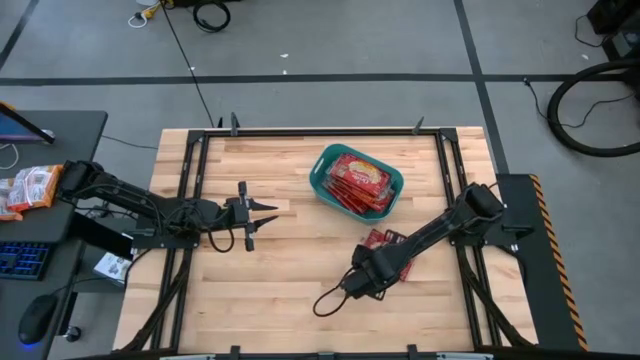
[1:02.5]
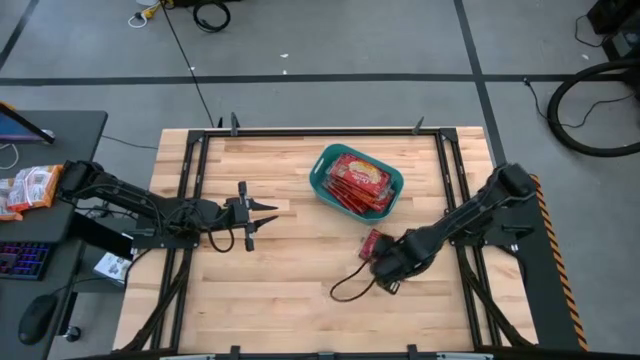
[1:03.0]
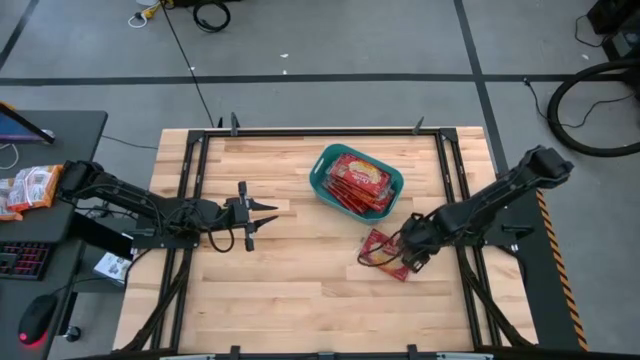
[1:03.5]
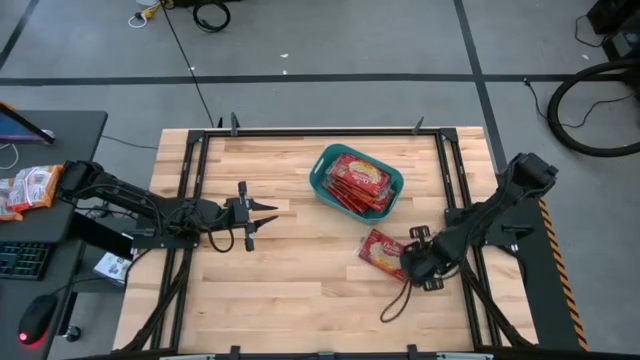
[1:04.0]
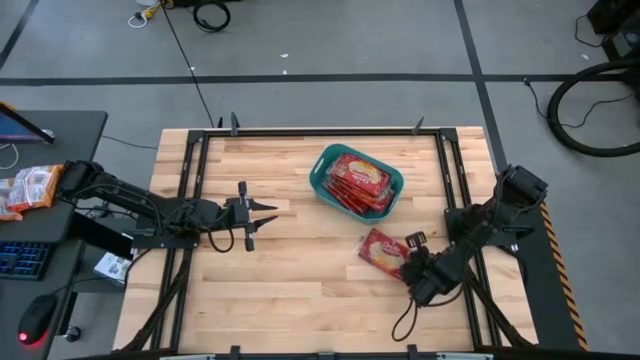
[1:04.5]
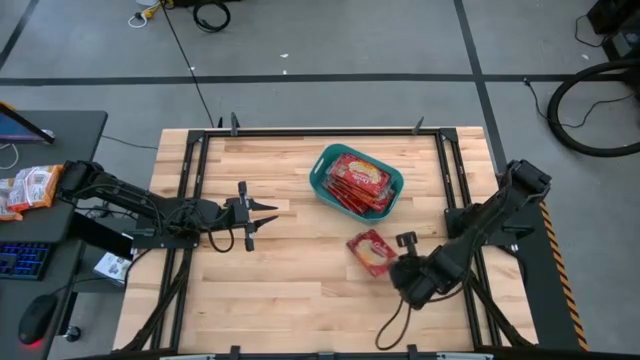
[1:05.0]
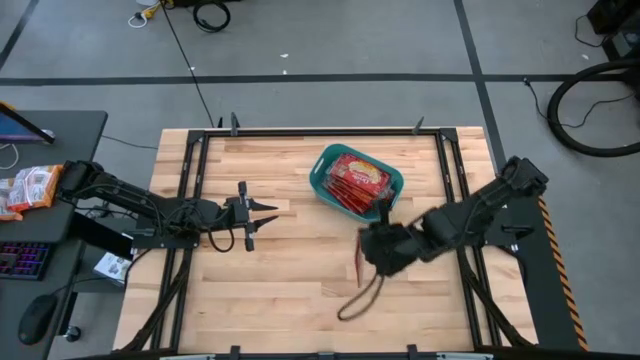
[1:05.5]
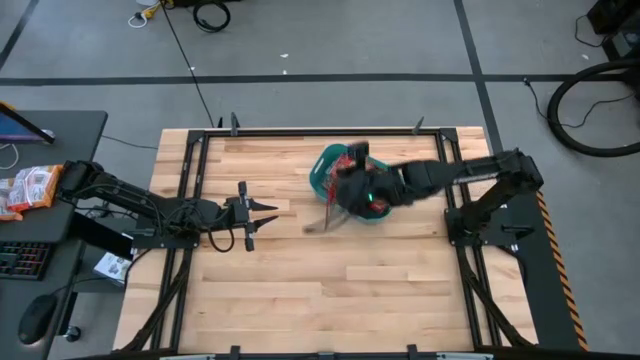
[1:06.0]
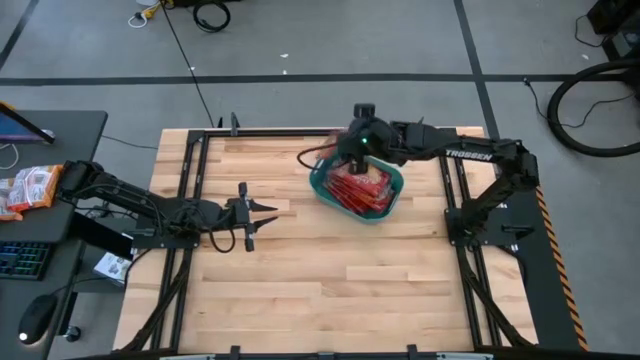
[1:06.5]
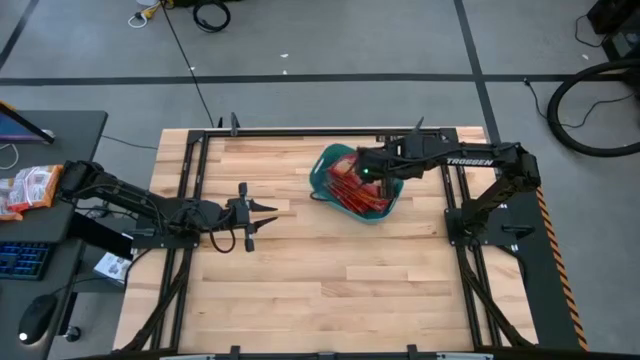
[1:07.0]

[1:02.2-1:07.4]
Task: Sort popcorn bags into baskets
Put the red popcorn bag into the green bin

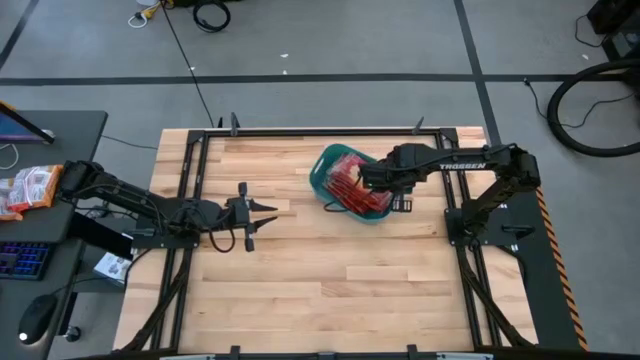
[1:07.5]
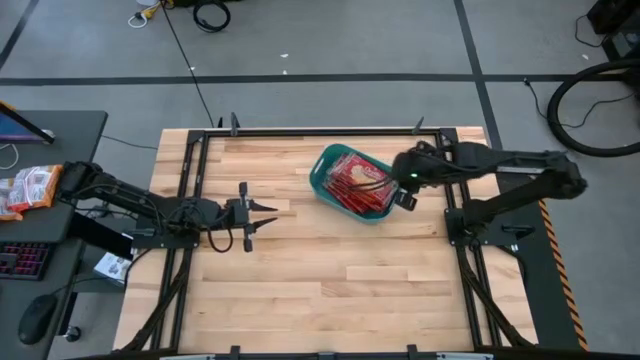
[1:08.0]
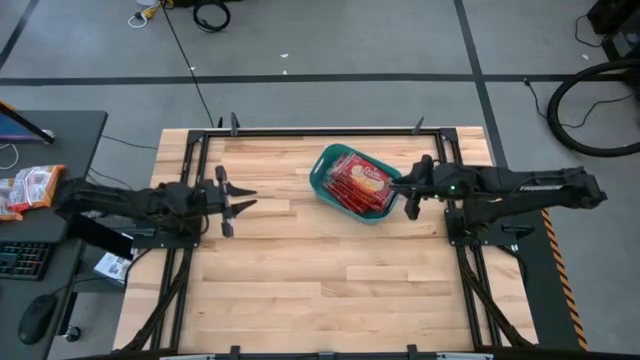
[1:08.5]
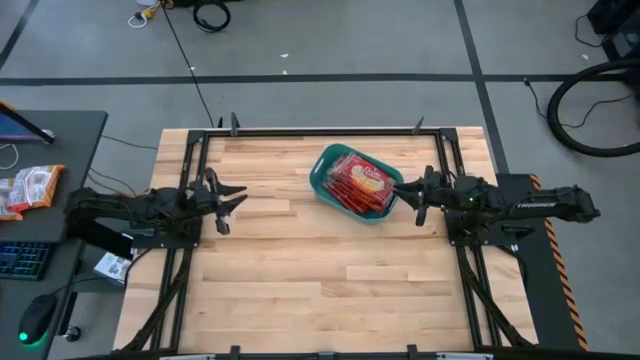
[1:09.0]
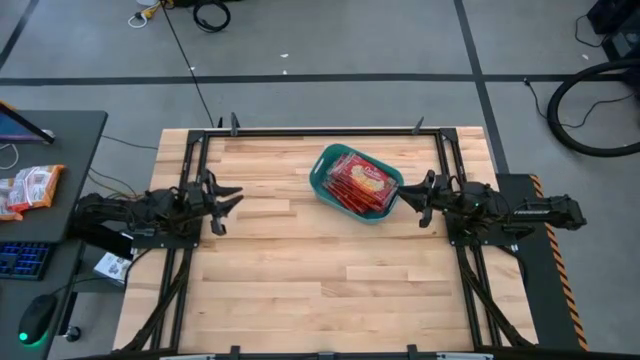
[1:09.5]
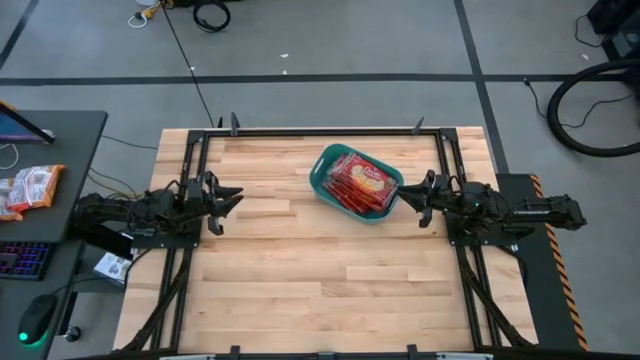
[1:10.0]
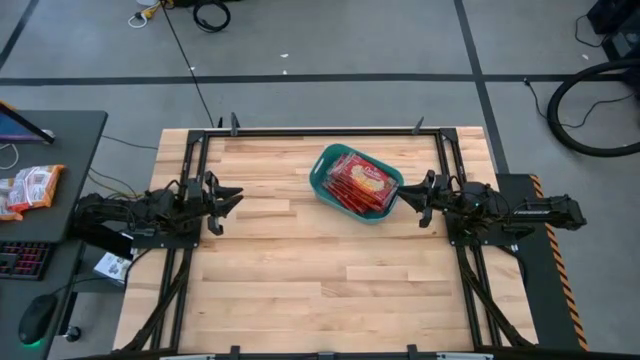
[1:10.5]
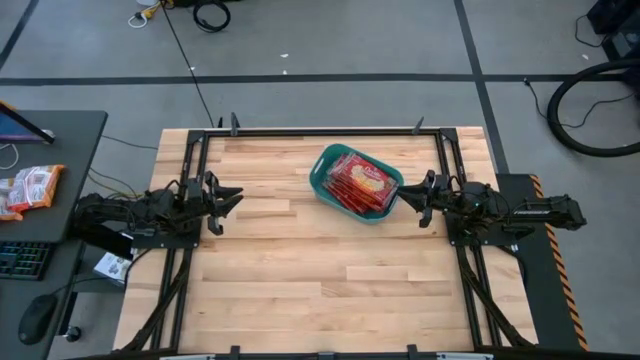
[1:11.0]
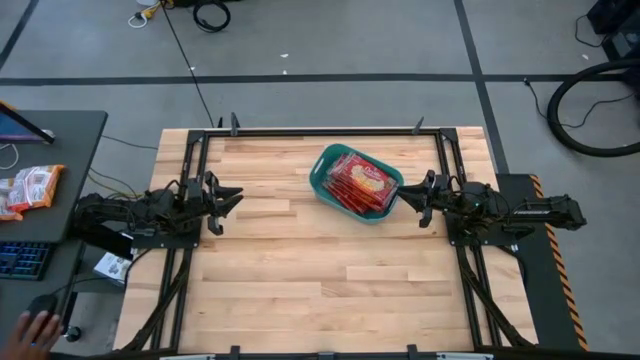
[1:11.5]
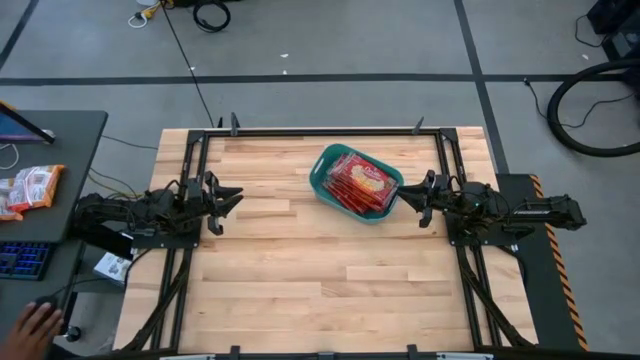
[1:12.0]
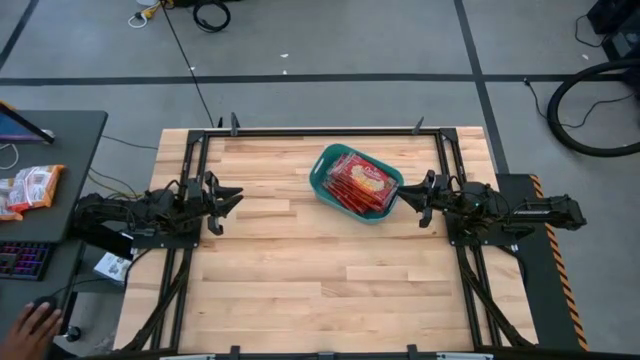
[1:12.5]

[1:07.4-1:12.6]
Return to Home Position

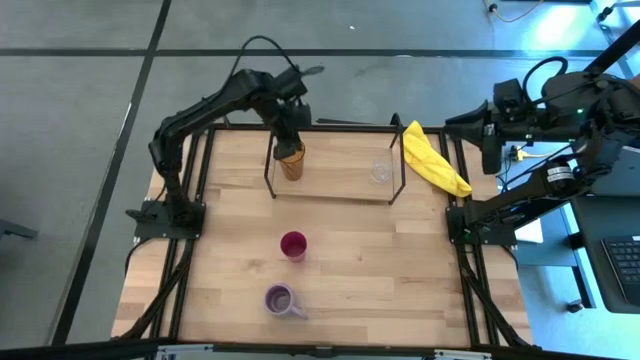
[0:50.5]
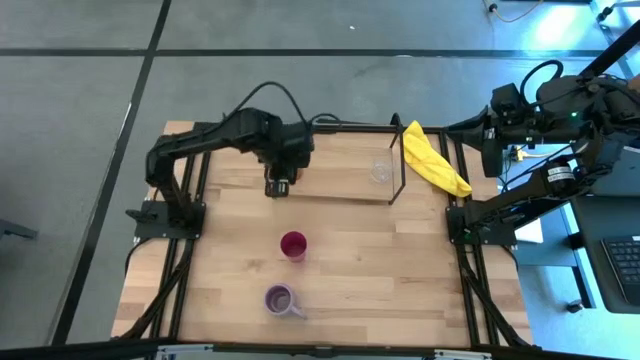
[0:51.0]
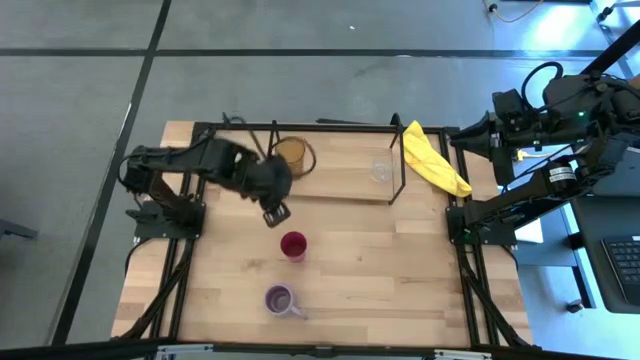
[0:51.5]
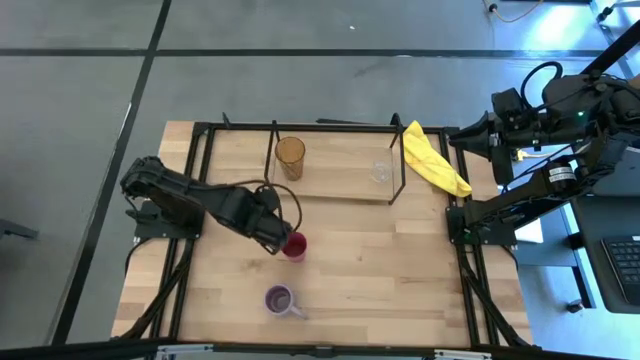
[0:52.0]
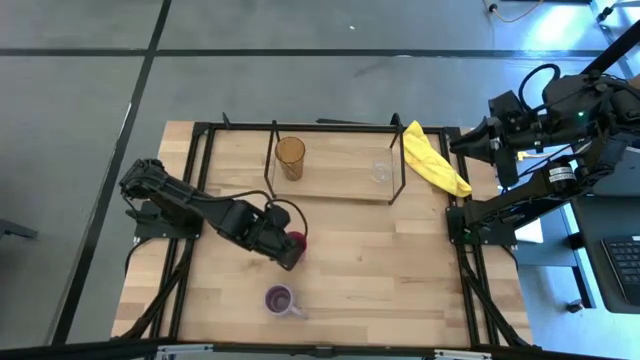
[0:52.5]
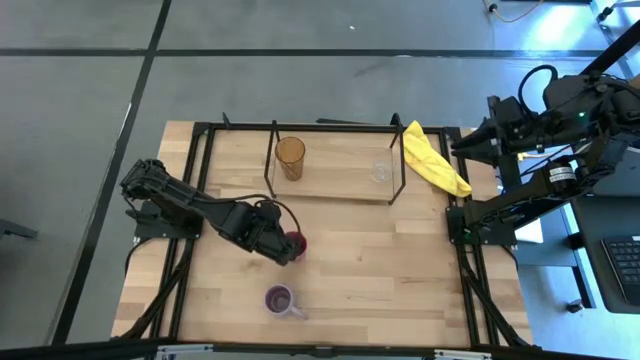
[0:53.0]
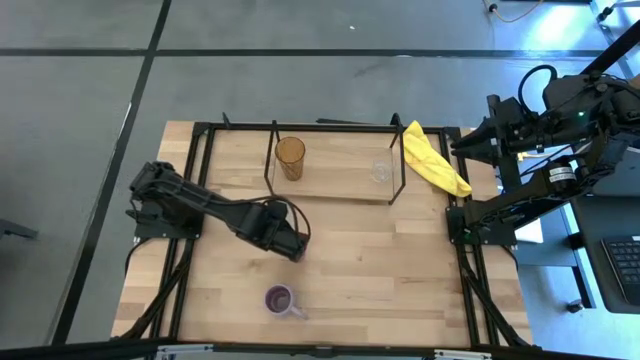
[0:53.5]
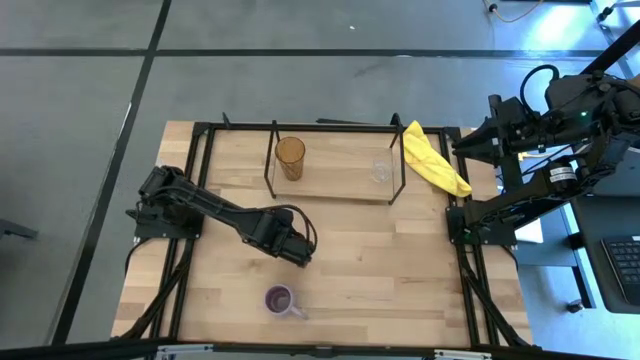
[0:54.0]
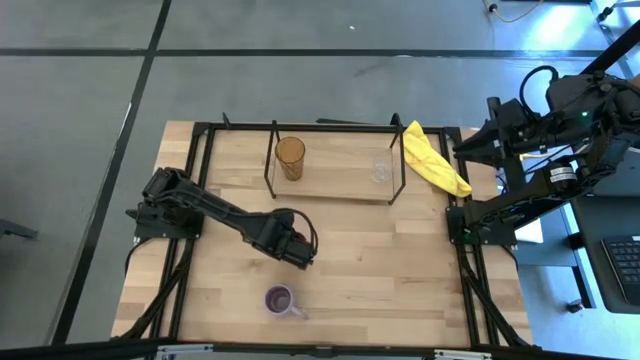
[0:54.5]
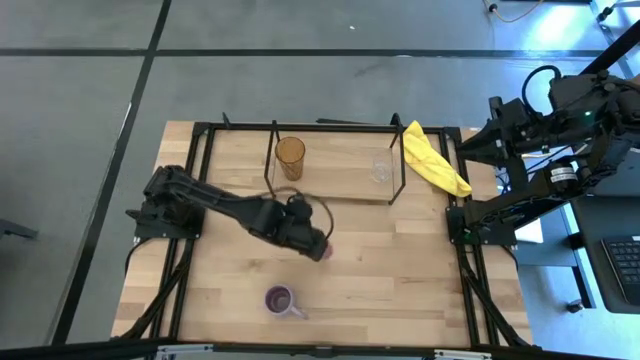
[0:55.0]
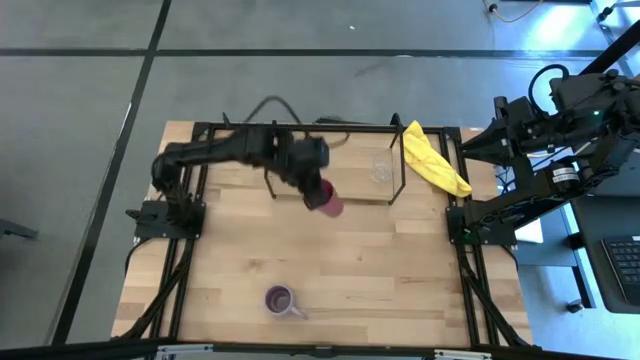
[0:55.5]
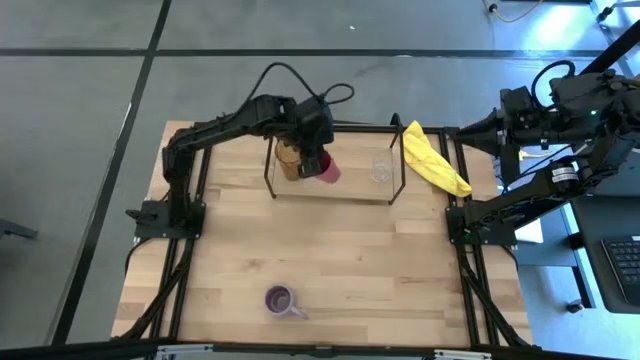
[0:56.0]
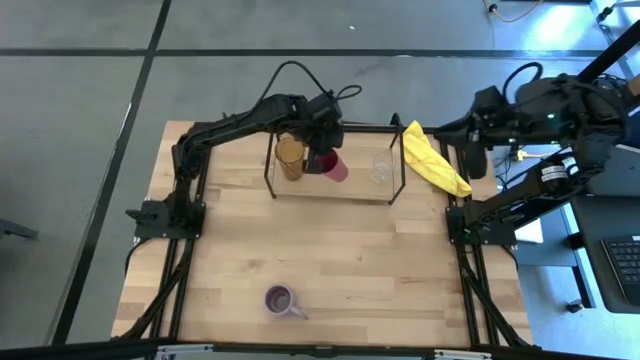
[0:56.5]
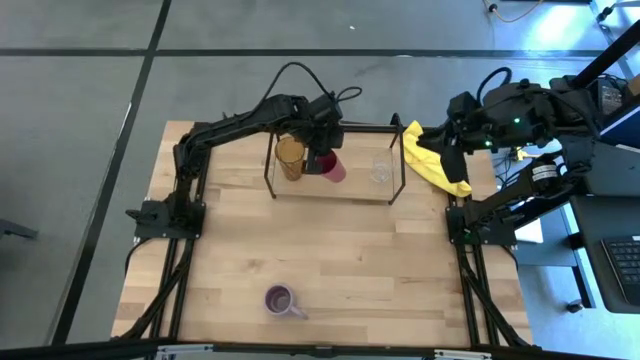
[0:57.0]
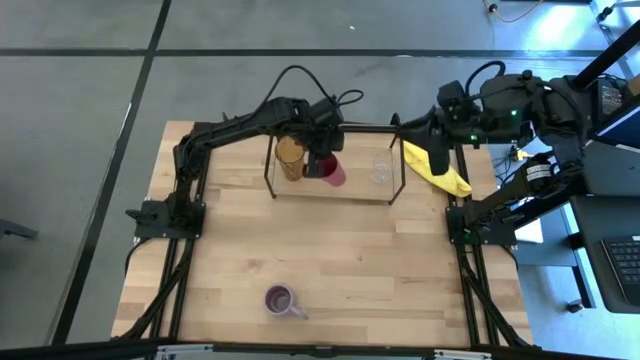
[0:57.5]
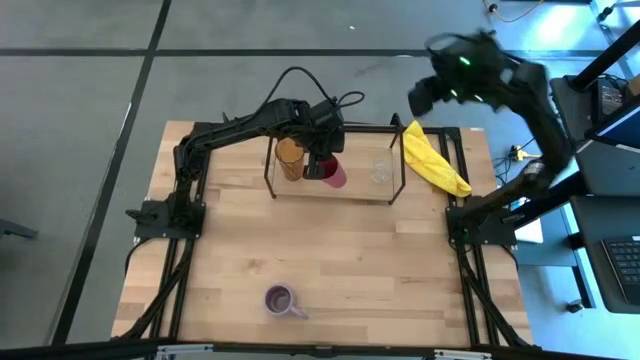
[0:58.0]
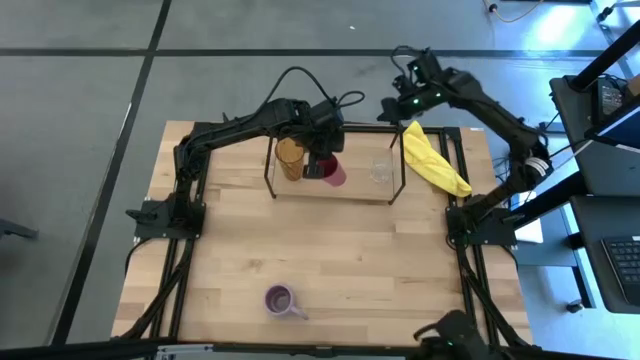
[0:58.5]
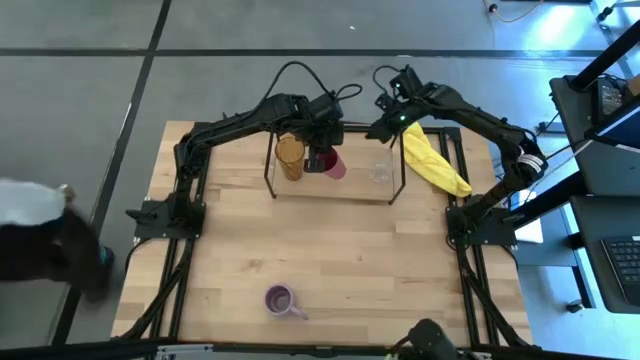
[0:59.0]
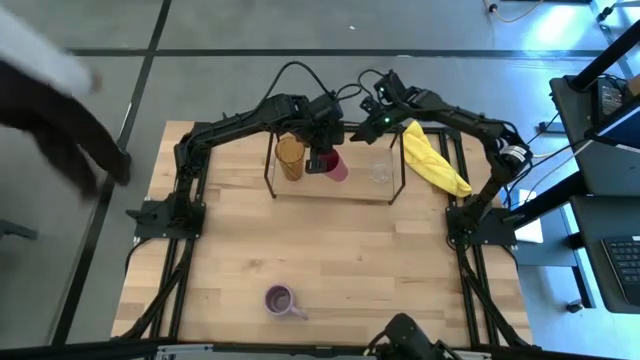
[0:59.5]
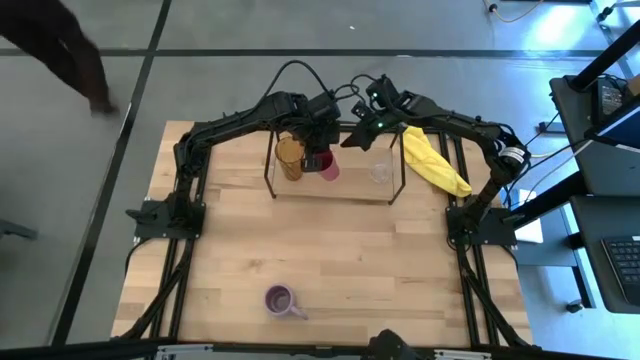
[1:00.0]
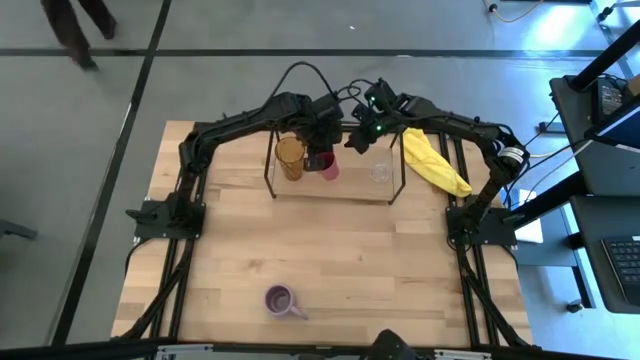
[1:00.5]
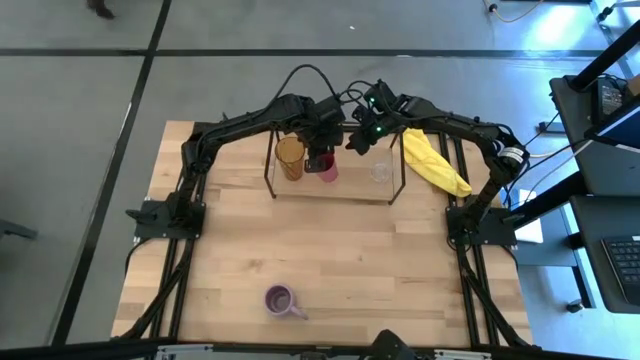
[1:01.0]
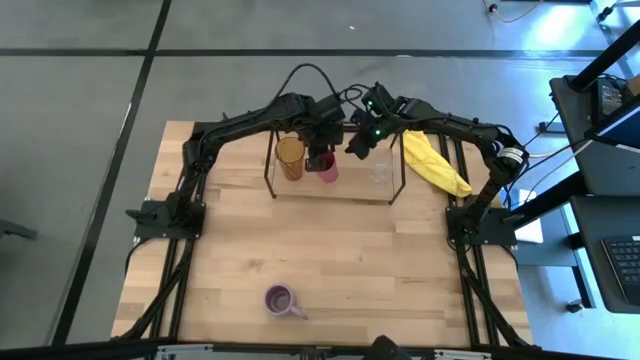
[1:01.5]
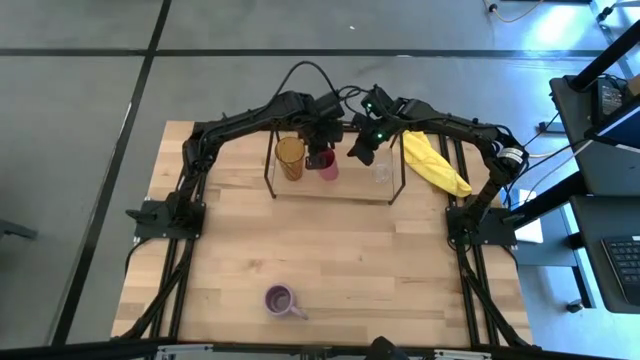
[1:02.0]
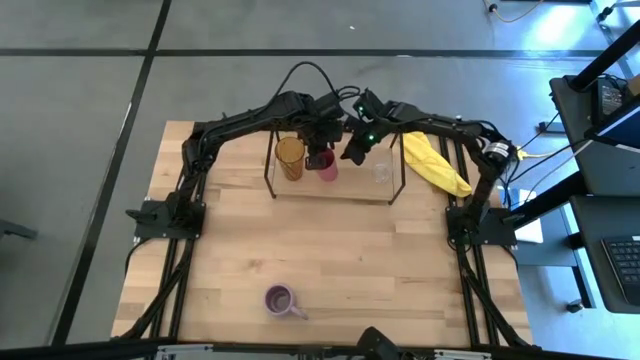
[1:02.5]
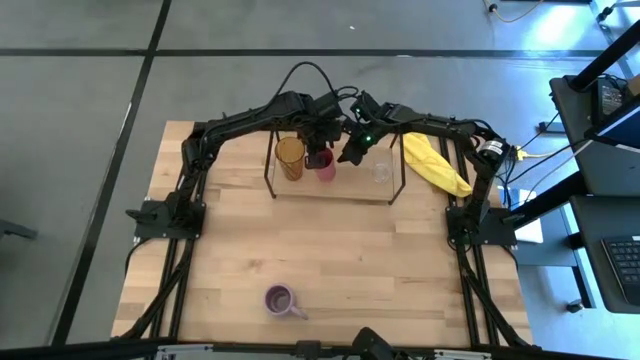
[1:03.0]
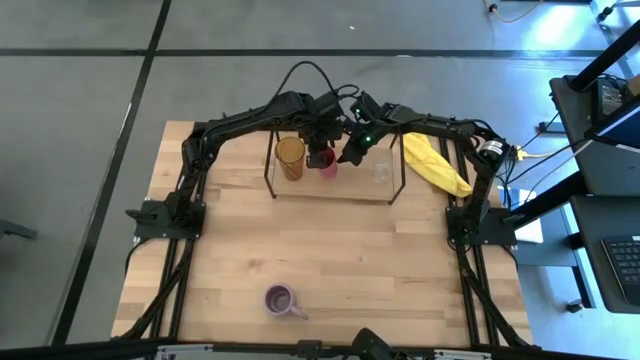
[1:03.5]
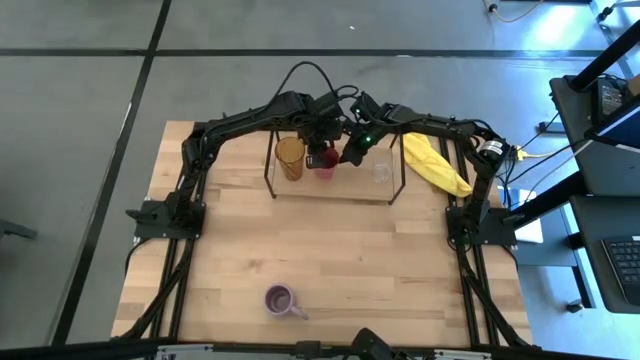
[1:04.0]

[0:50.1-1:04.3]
Task: Stack small to large cups/mugs on shelf
Put the pink cup on the shelf
